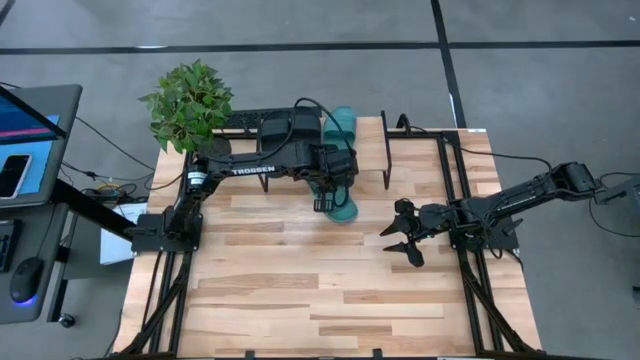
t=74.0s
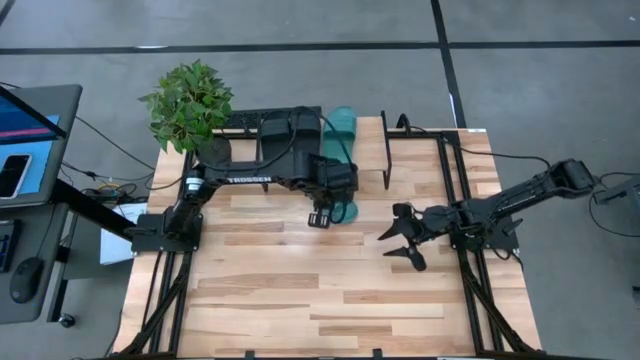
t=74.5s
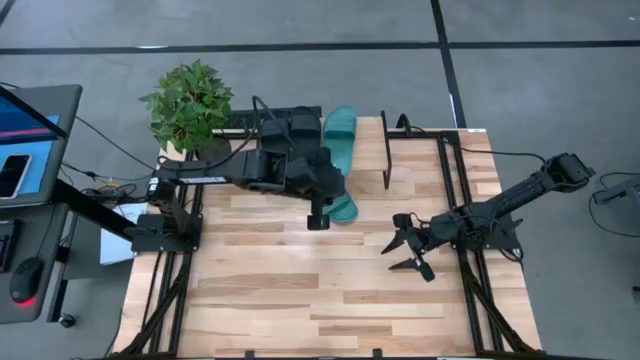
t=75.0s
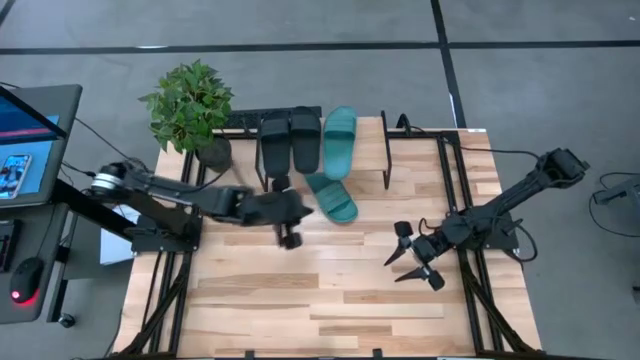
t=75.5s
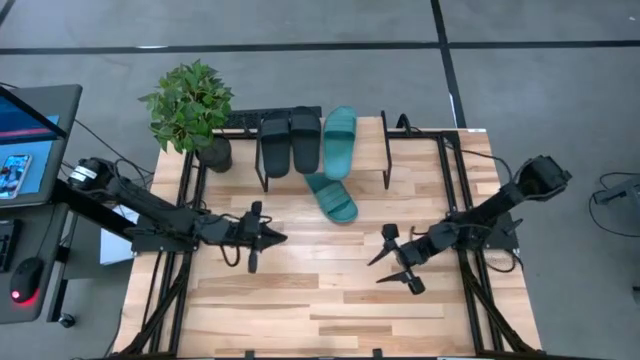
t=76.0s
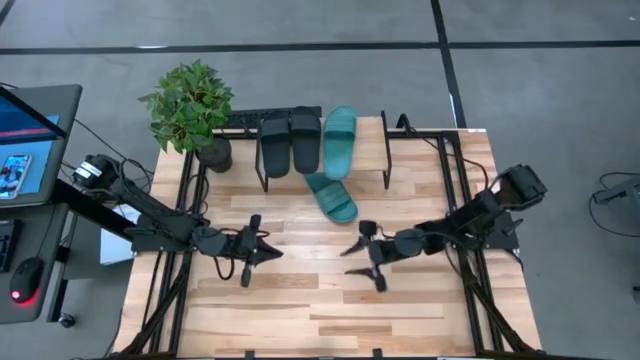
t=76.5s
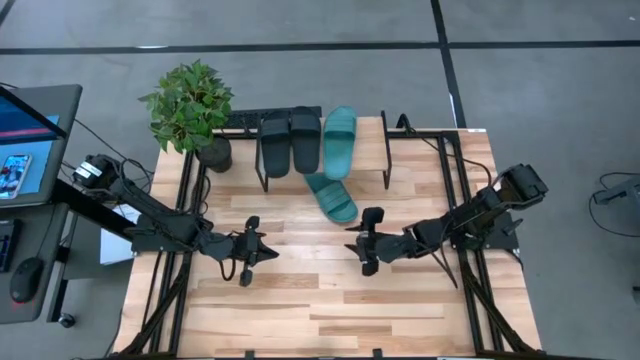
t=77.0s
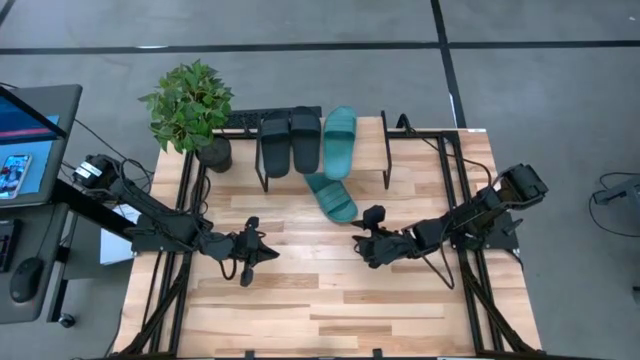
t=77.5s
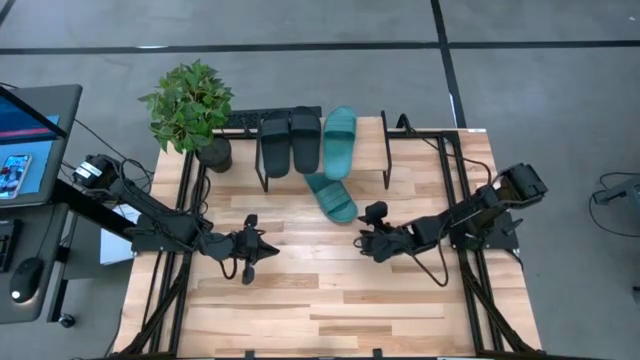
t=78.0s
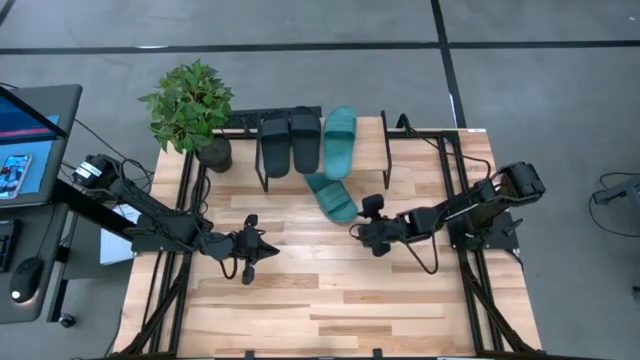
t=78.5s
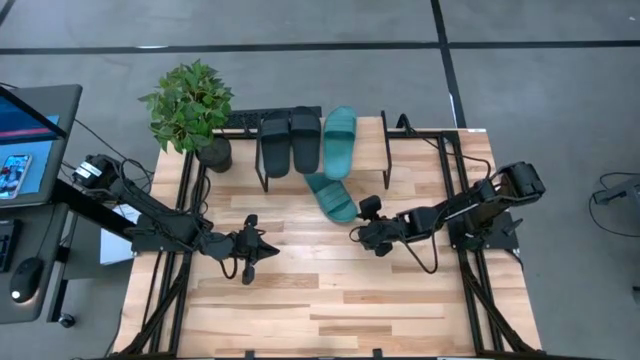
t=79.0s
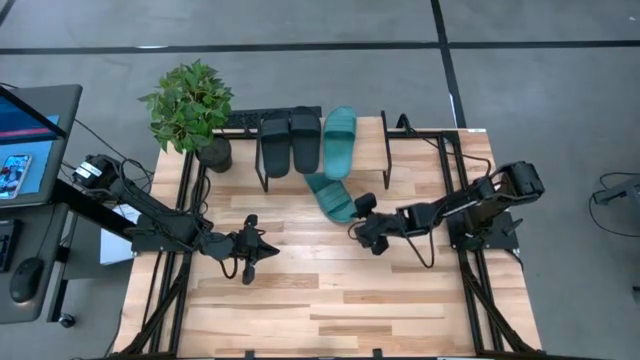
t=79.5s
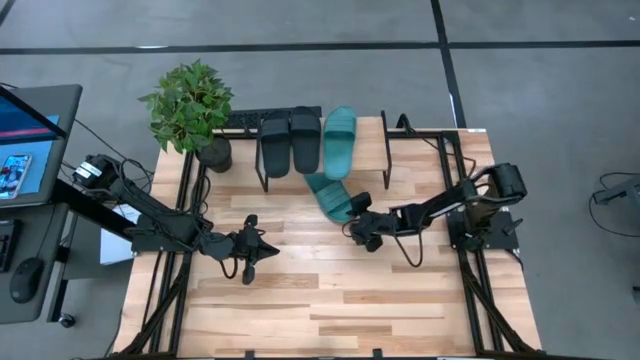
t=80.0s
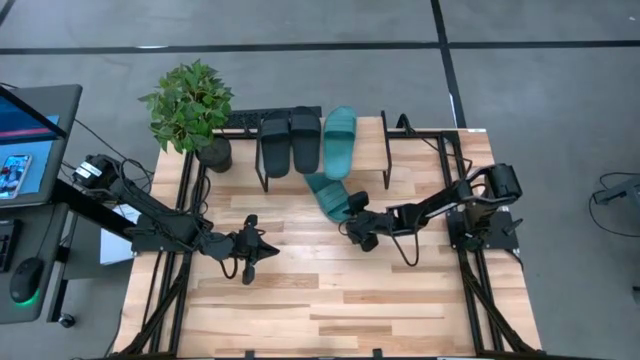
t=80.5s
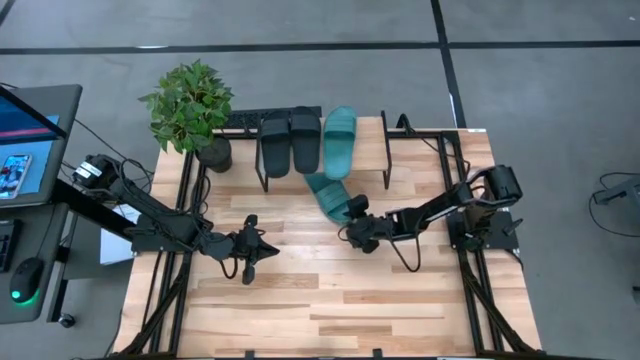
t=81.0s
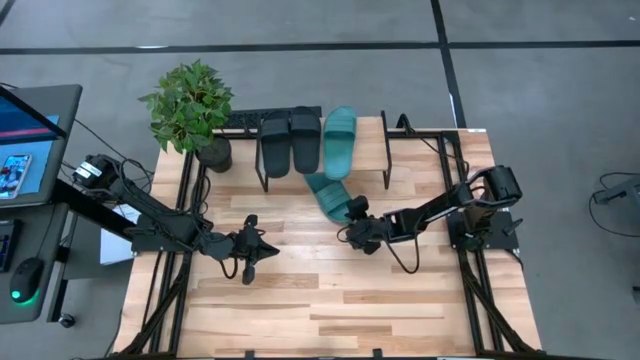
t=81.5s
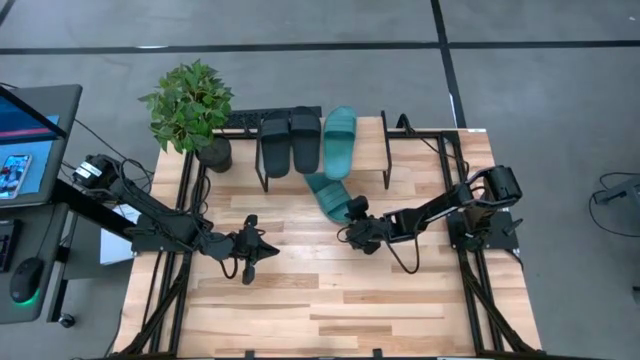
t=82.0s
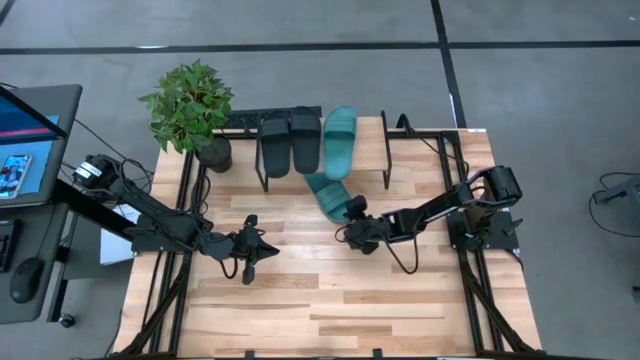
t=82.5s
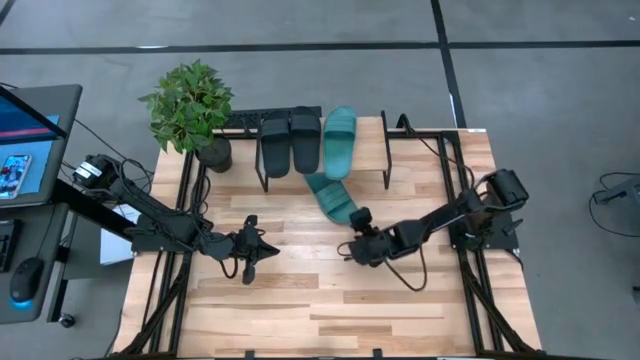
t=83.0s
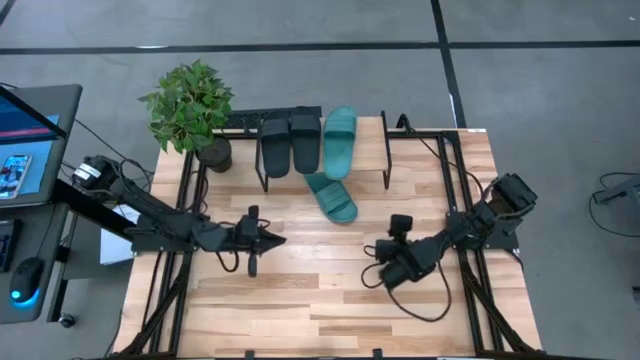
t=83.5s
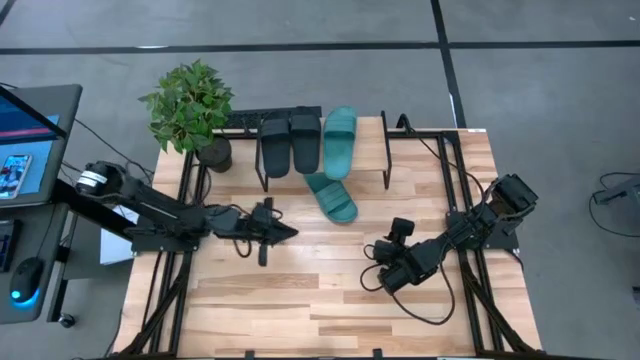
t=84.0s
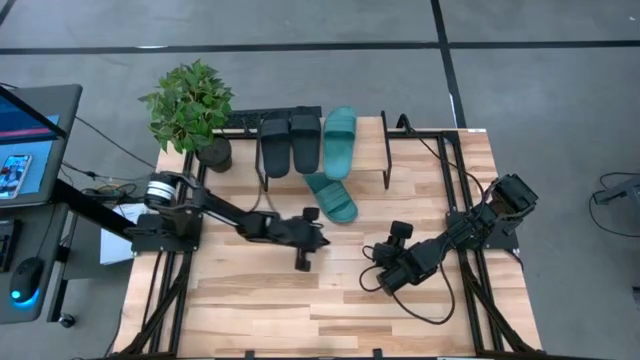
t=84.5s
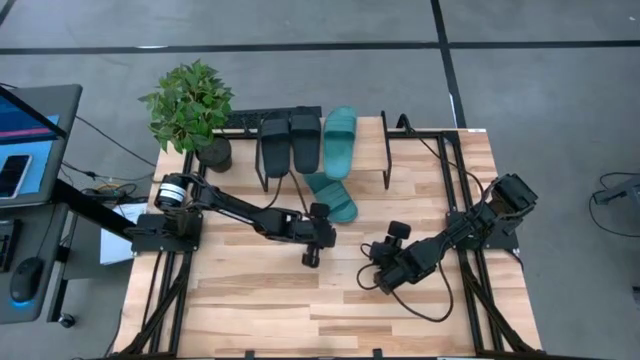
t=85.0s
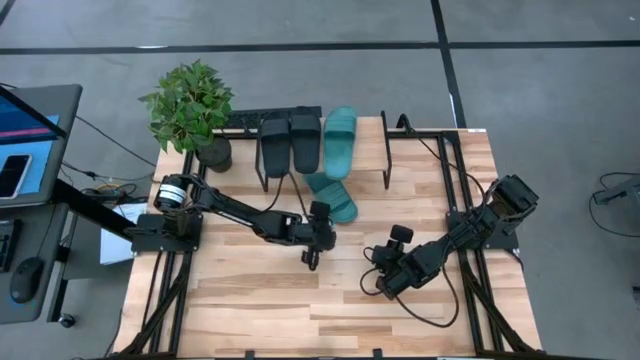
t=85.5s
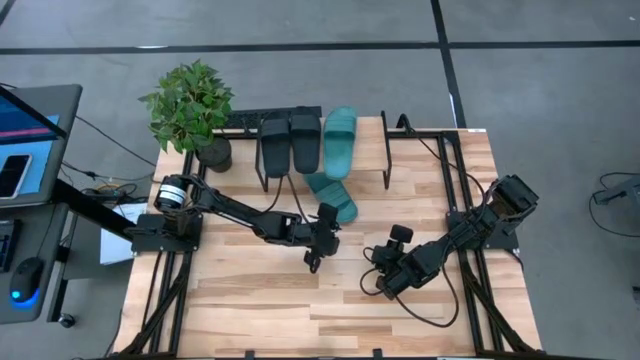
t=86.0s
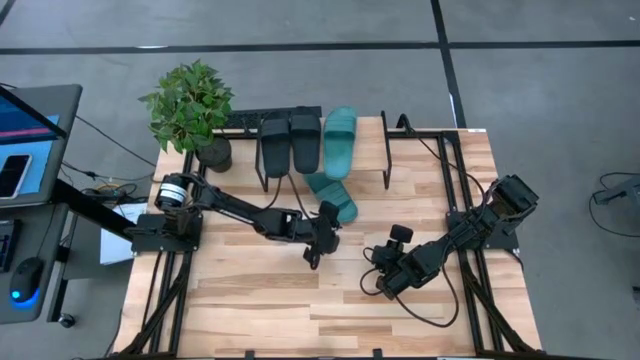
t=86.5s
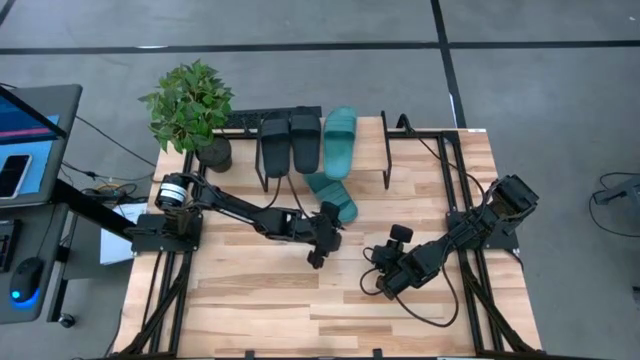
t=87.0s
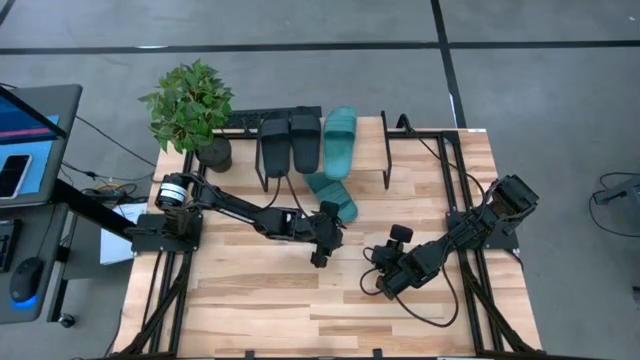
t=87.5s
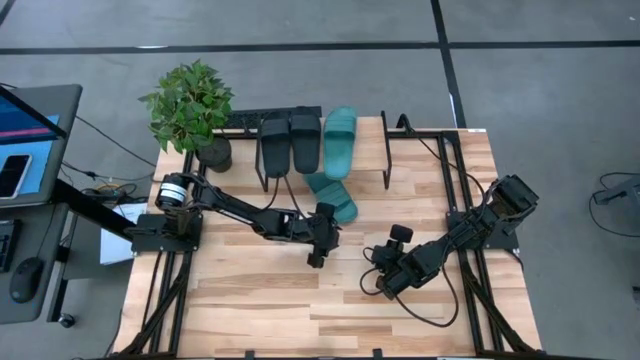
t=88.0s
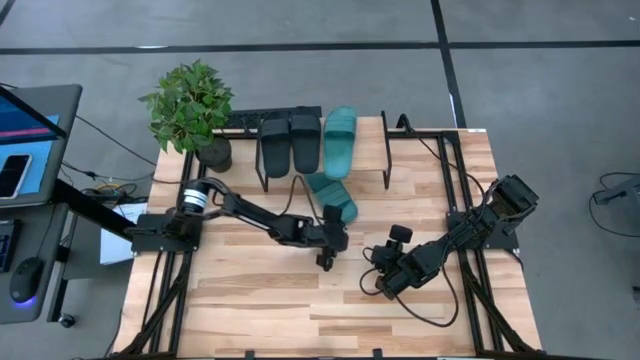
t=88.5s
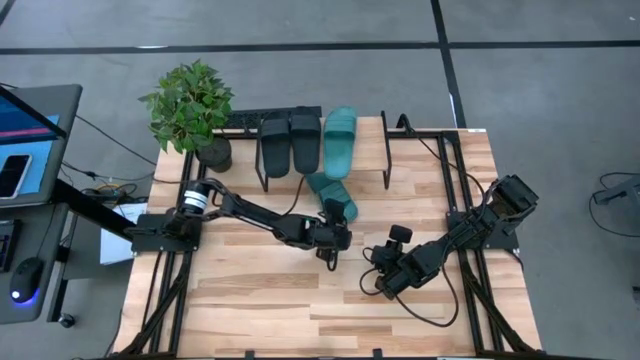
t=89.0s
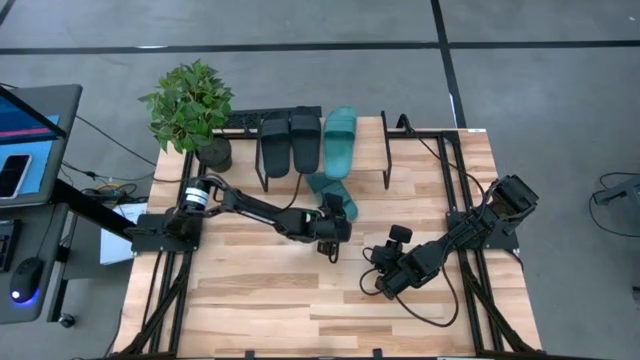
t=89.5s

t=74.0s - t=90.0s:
Task: Pick and place slides into the shelf
Put the green pair of slippers on the shelf
